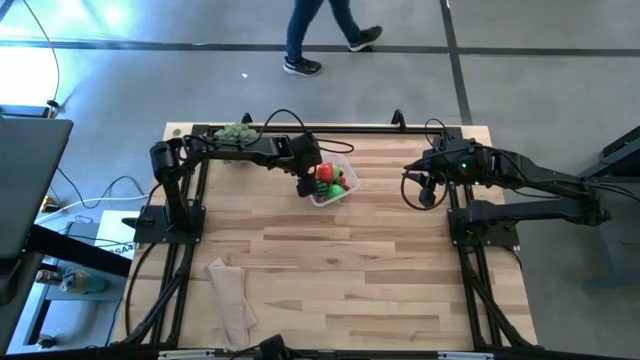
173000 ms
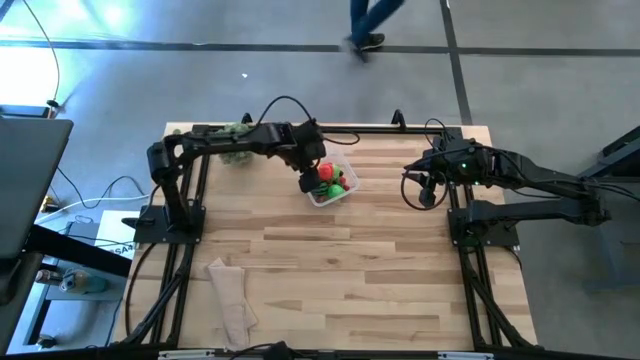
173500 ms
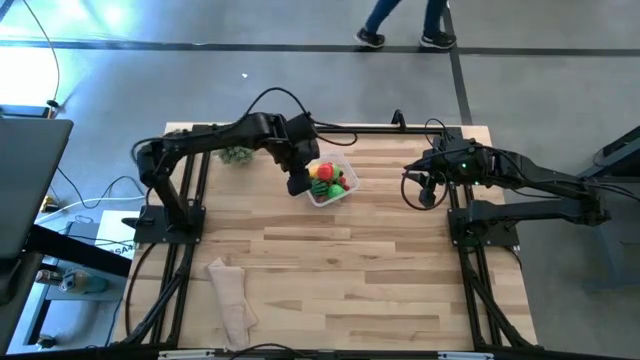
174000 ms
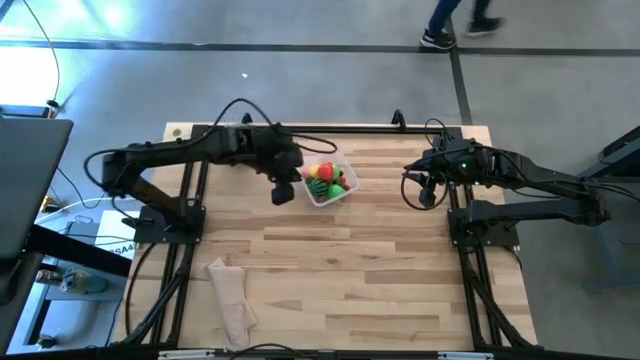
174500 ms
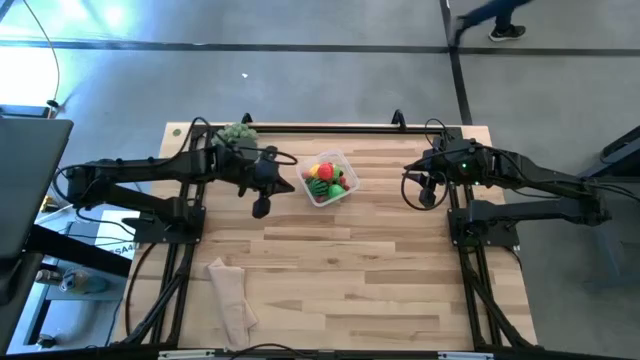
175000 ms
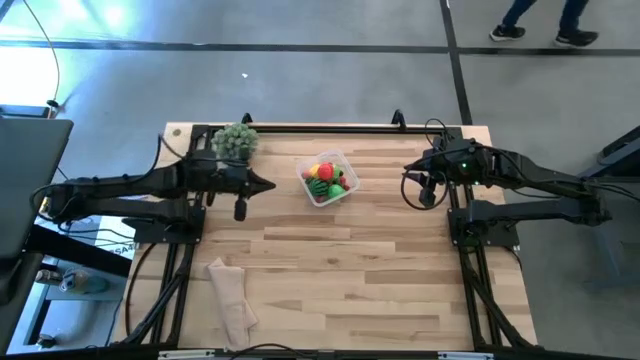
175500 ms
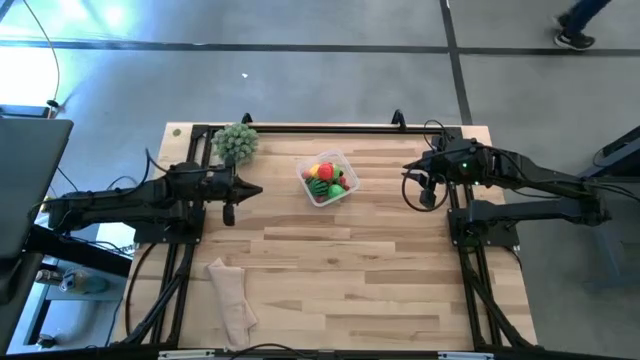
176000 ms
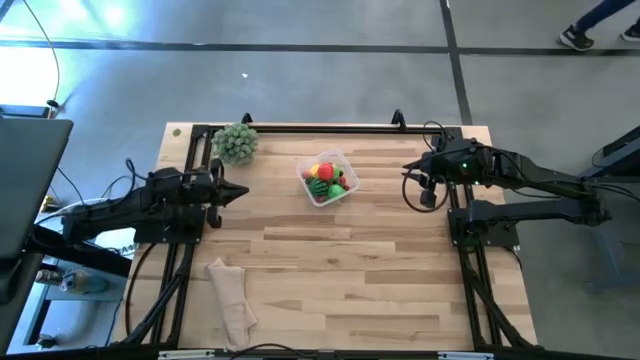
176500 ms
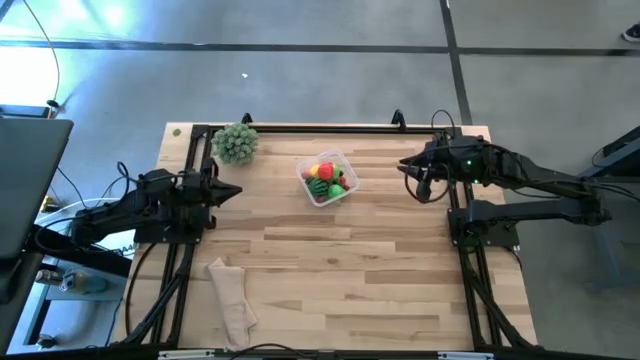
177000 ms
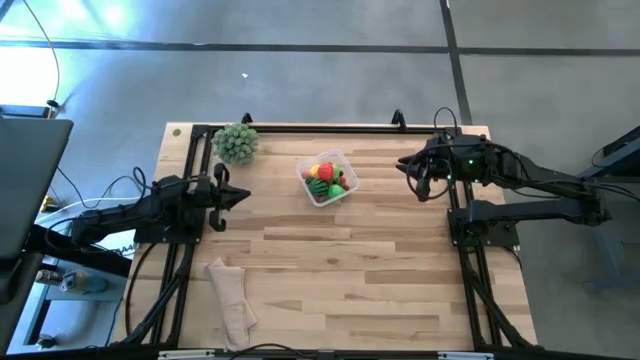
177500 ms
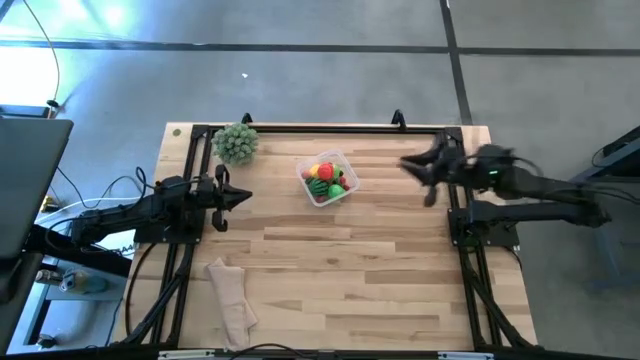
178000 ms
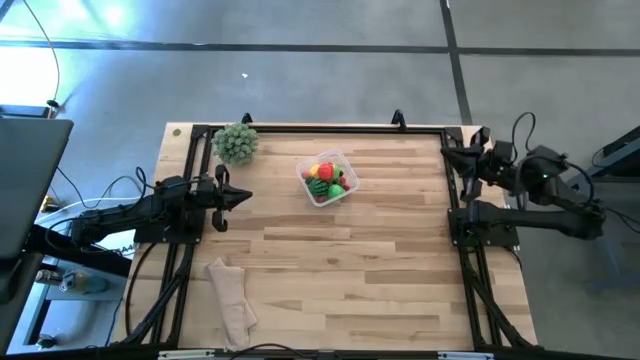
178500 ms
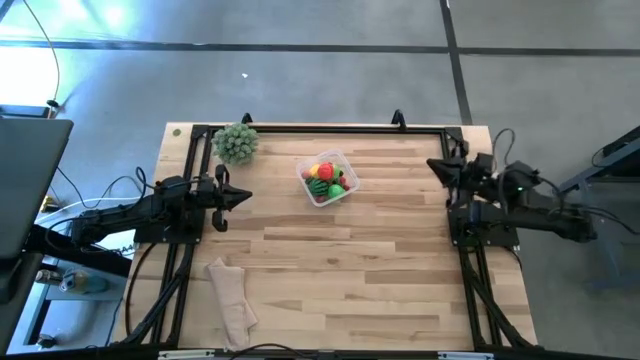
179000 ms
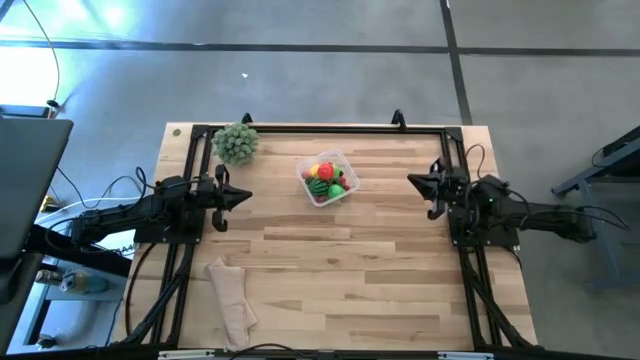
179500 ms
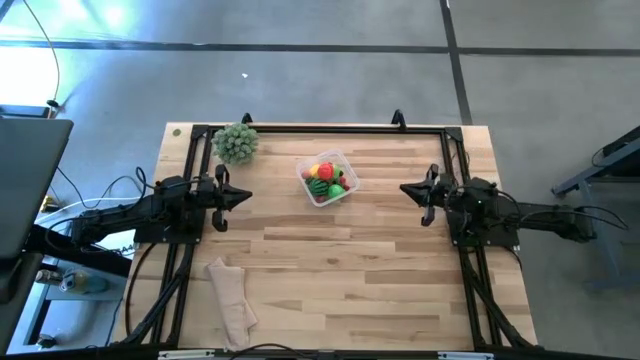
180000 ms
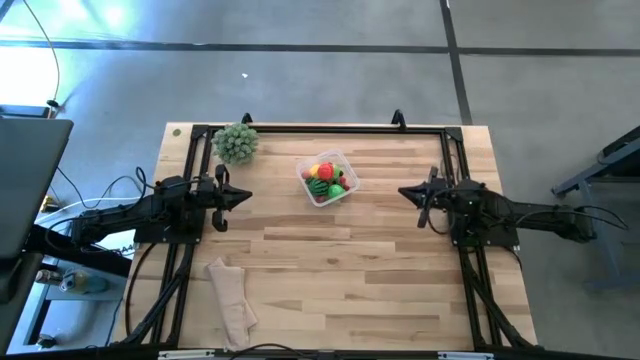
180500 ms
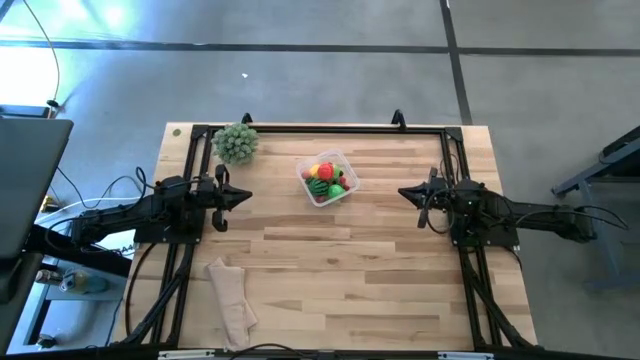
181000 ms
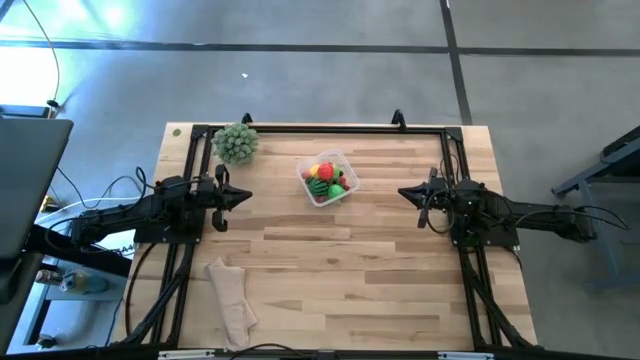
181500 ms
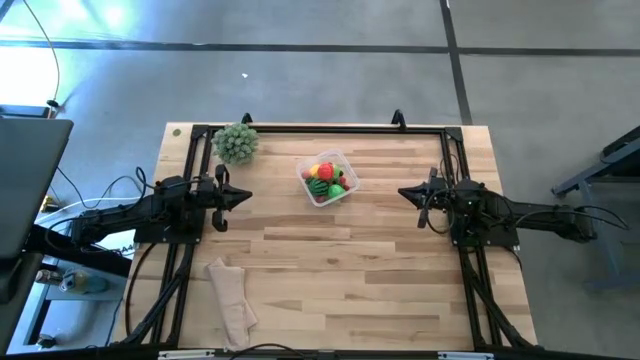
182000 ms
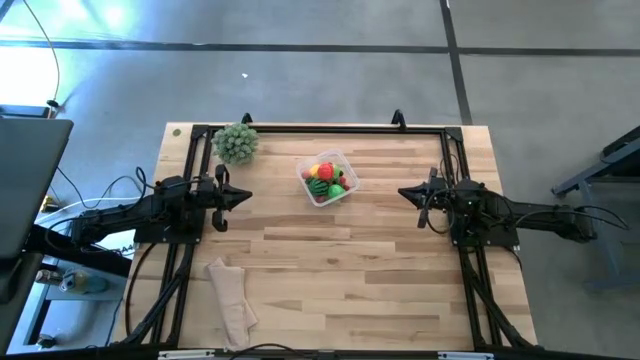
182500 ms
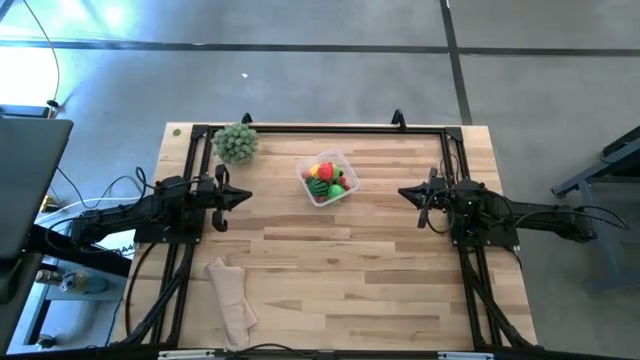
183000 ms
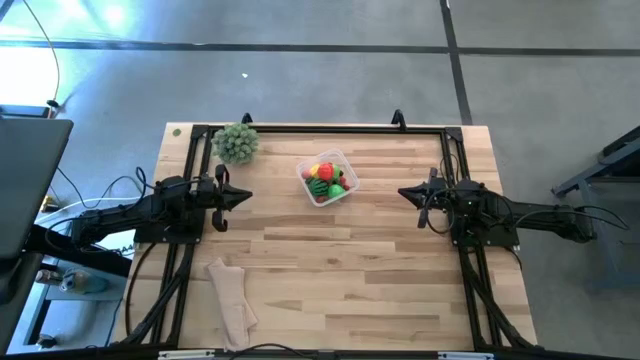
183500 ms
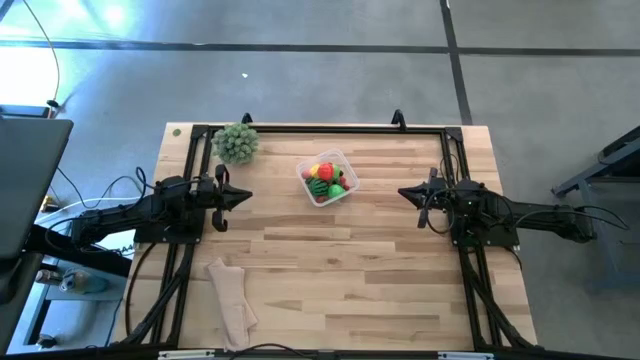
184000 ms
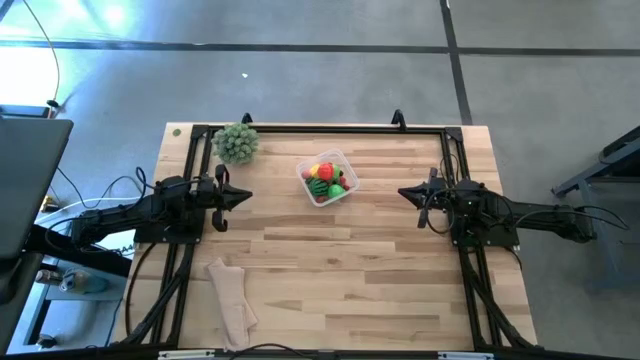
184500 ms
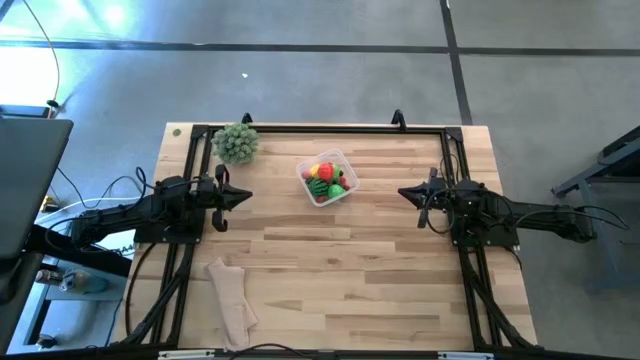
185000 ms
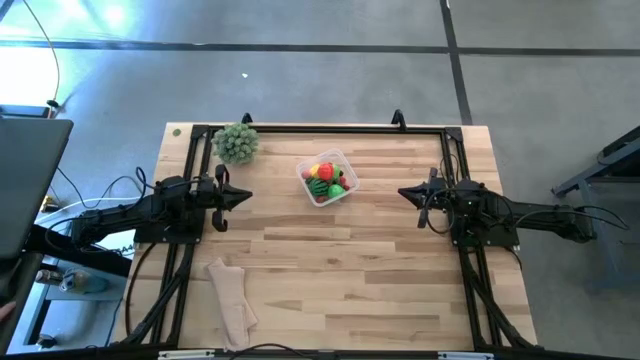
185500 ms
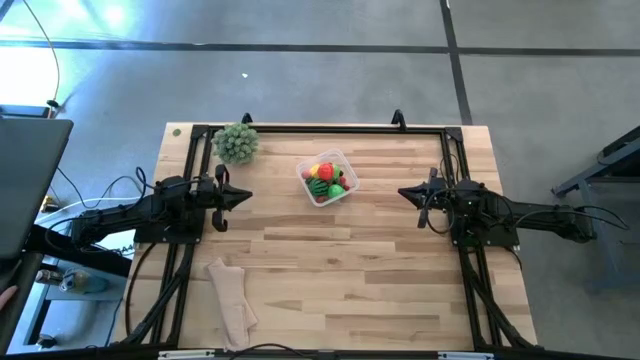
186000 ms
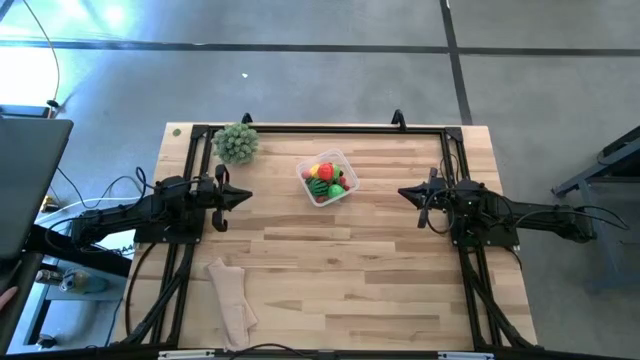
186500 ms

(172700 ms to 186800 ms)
Task: Pick and placing Produce into tupperware
Return to Home Position

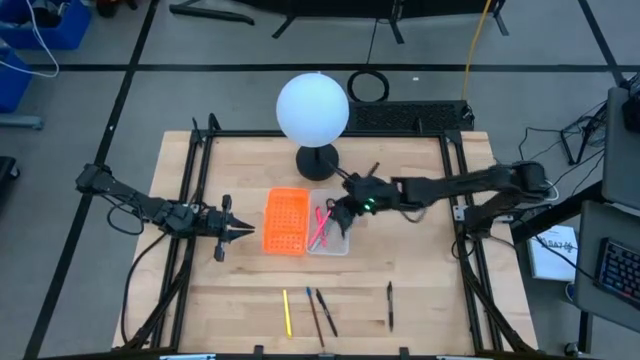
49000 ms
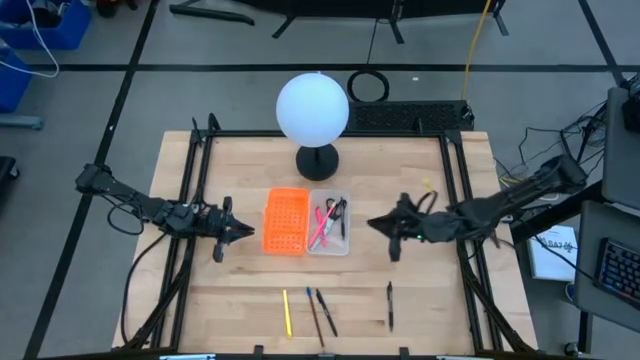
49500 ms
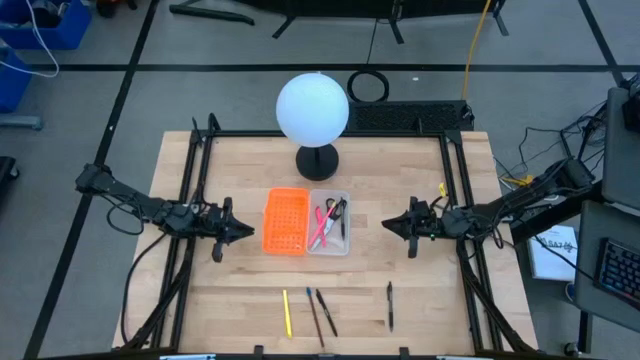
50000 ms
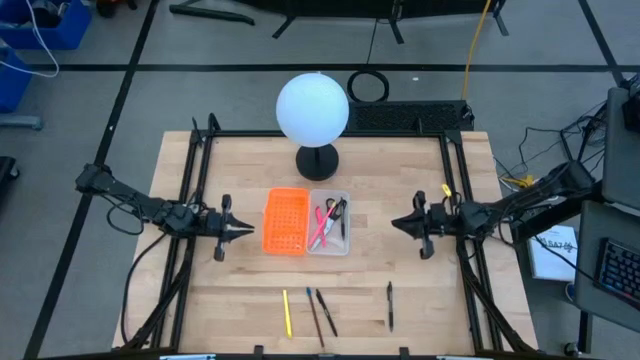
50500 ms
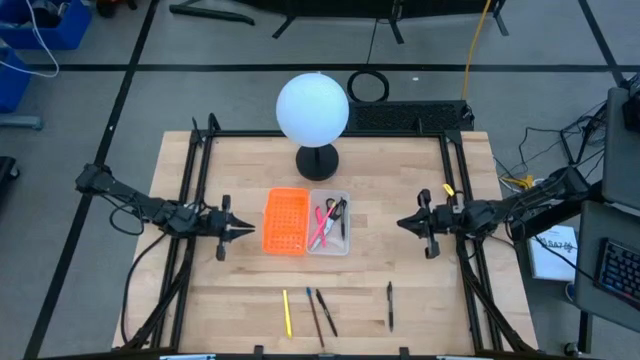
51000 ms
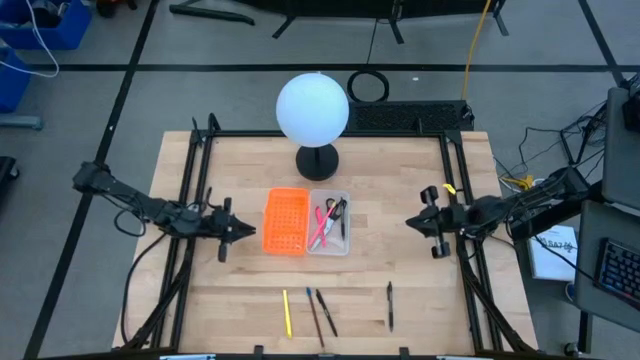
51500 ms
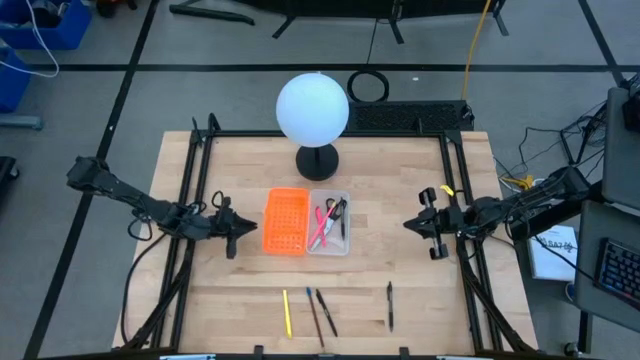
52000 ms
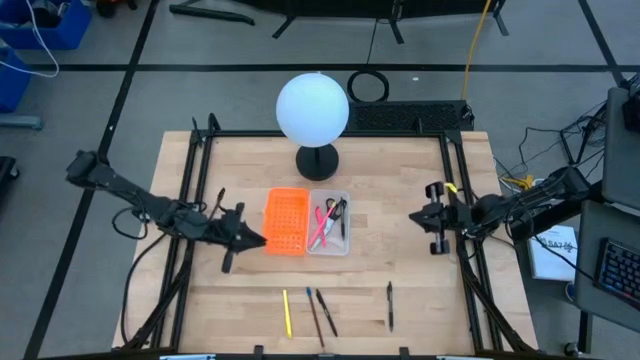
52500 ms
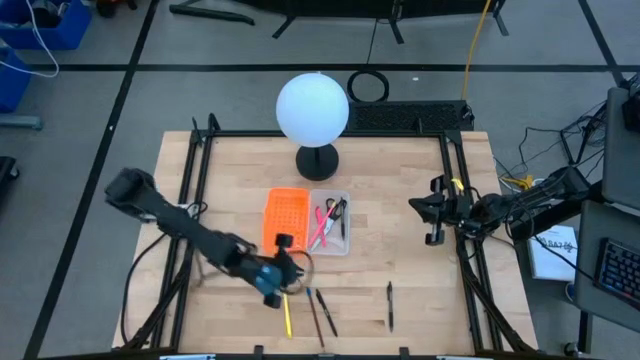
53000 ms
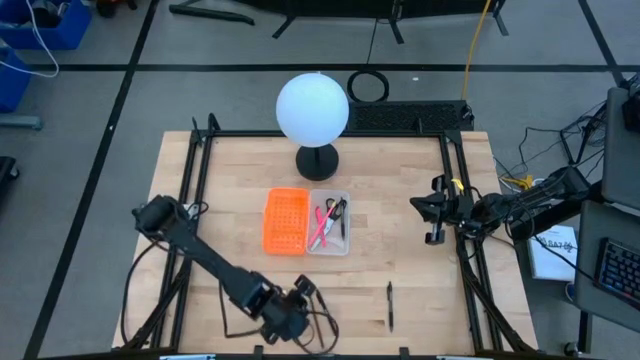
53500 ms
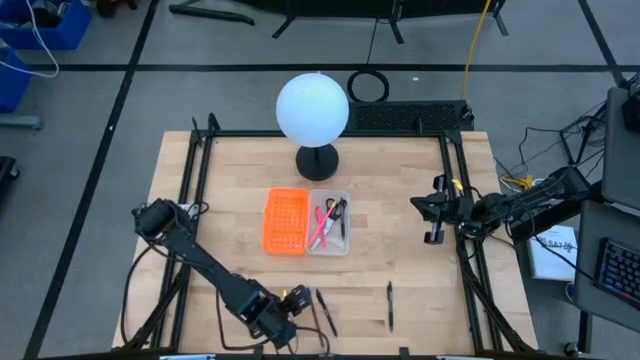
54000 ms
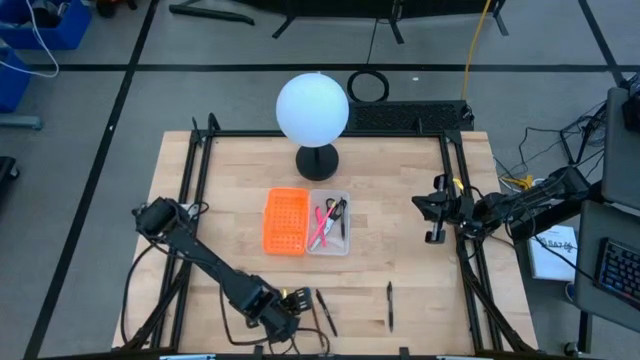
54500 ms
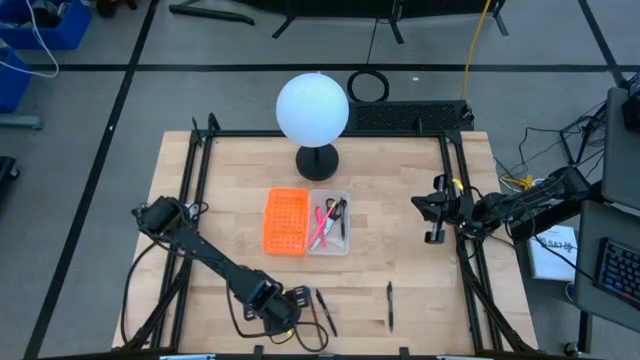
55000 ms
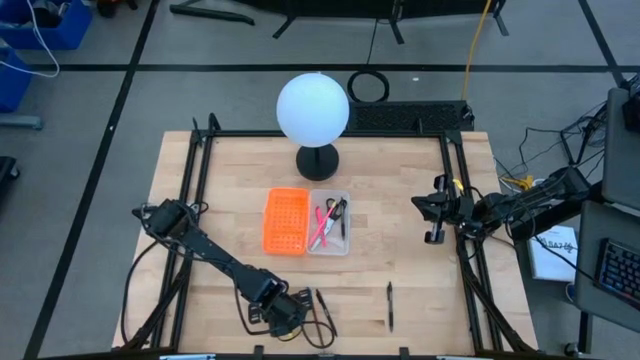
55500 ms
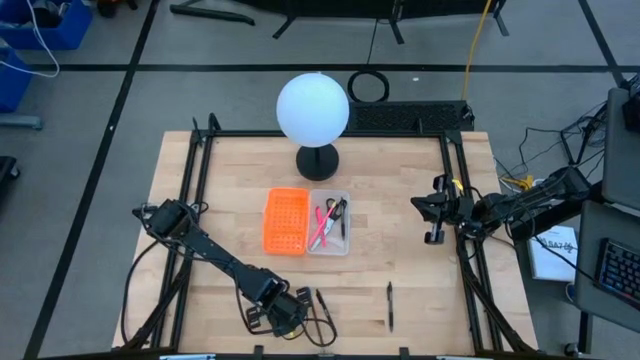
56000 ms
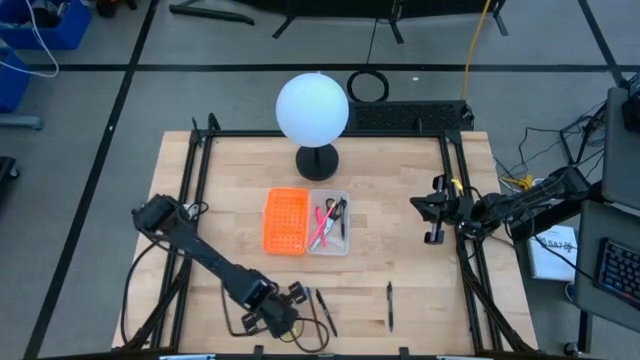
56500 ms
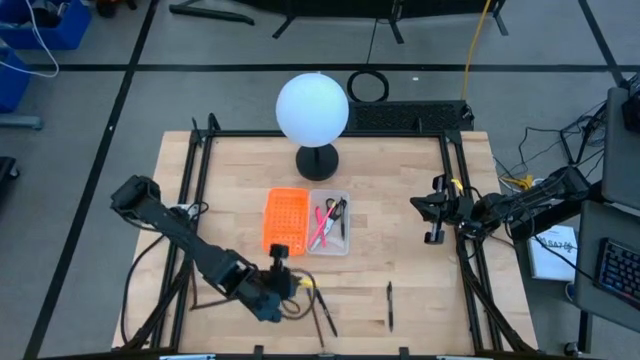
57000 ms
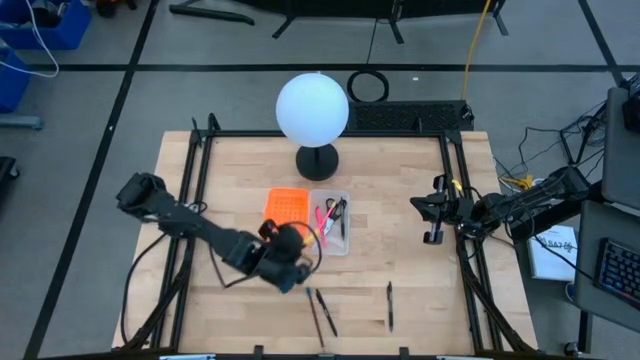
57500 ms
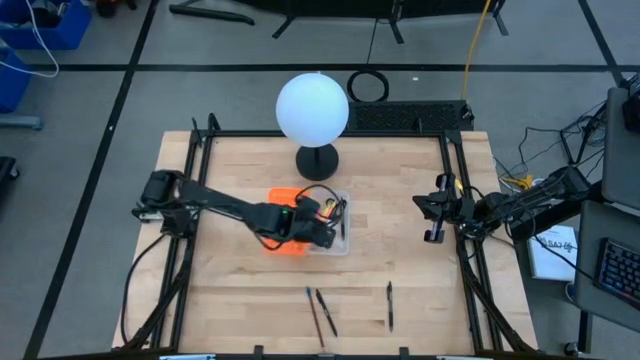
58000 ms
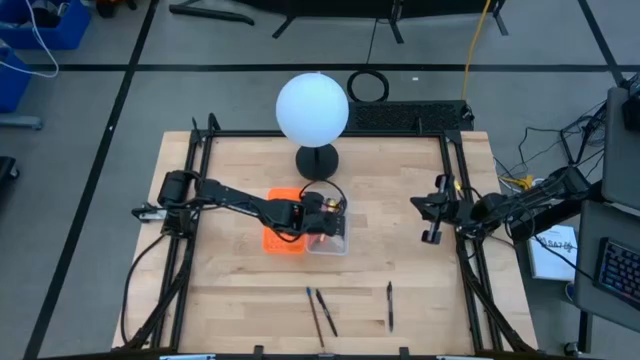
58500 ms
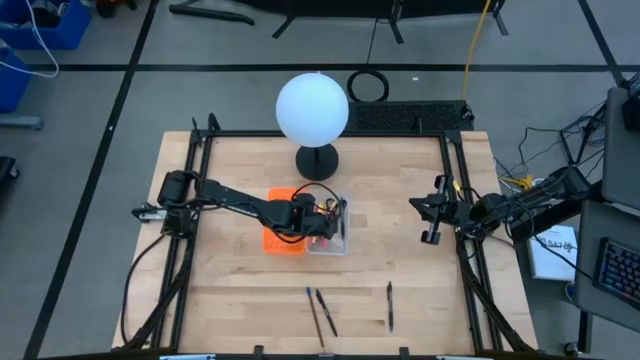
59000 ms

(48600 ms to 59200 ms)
Task: Pick & place school supplies into a supply box
Put the yellow pen into the orange supply box
